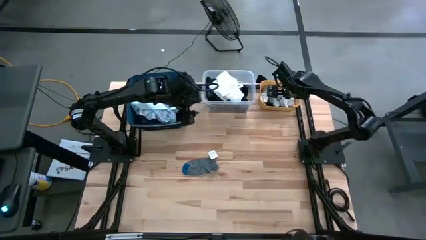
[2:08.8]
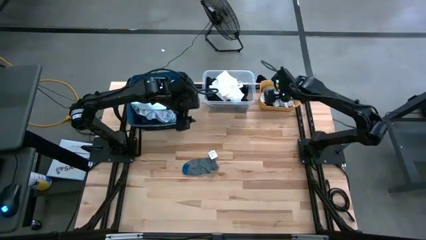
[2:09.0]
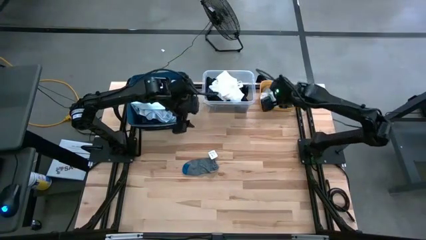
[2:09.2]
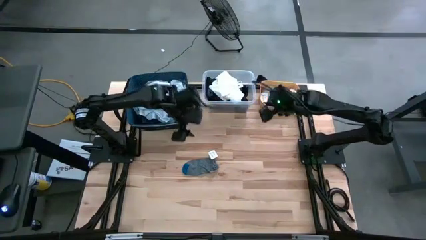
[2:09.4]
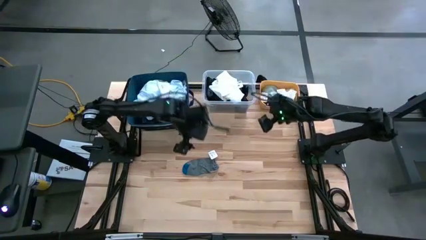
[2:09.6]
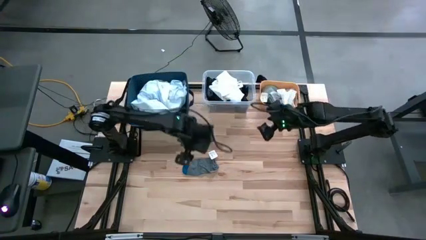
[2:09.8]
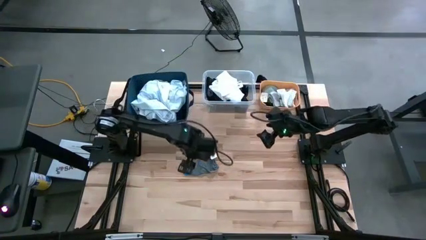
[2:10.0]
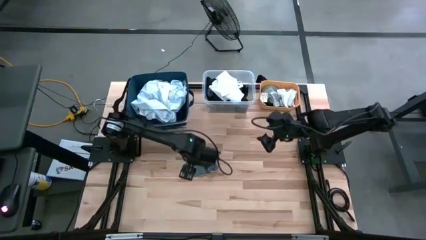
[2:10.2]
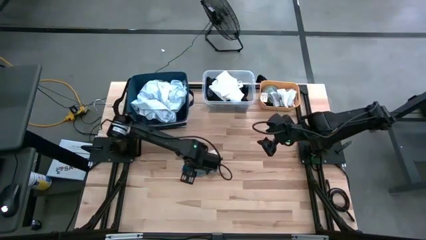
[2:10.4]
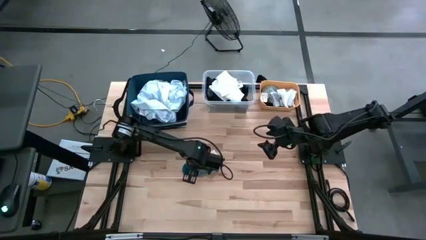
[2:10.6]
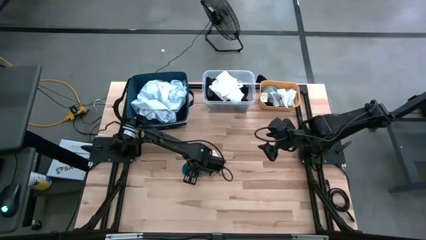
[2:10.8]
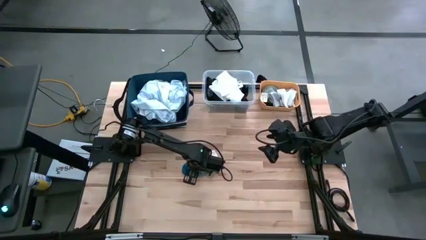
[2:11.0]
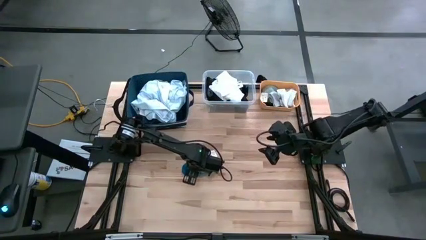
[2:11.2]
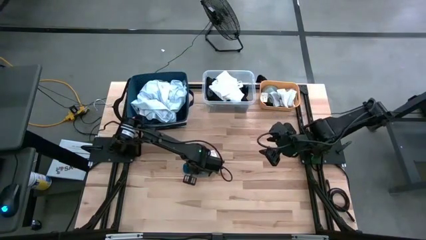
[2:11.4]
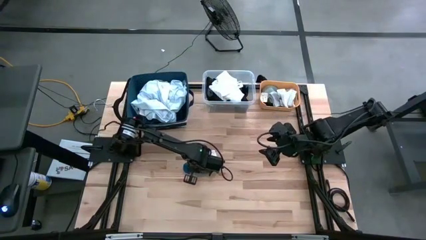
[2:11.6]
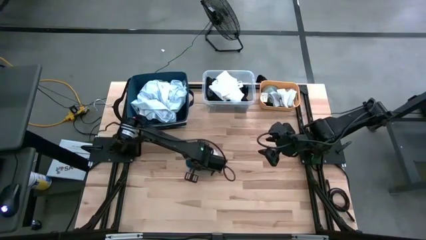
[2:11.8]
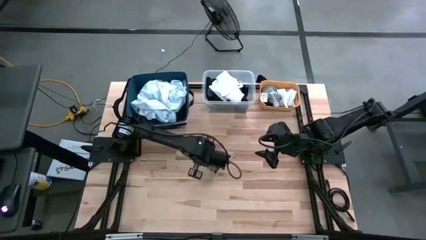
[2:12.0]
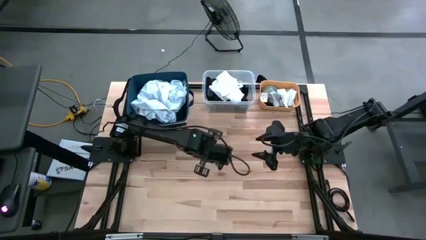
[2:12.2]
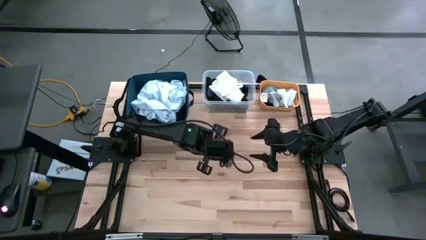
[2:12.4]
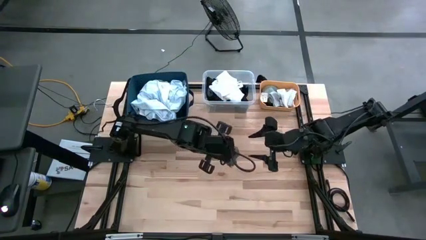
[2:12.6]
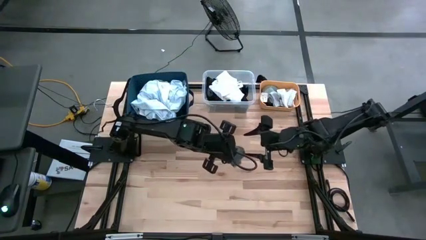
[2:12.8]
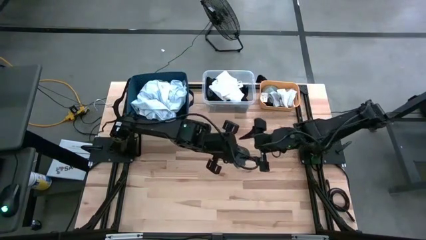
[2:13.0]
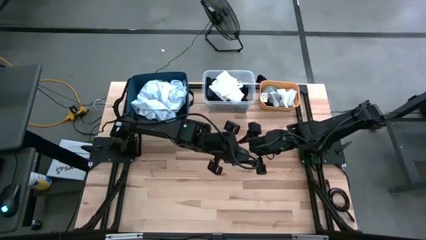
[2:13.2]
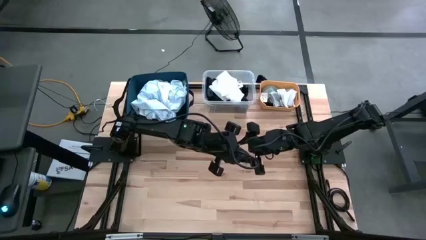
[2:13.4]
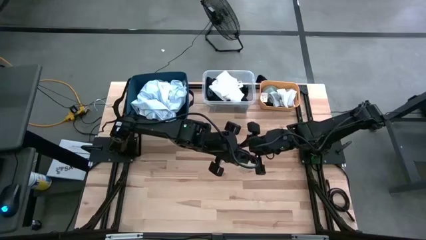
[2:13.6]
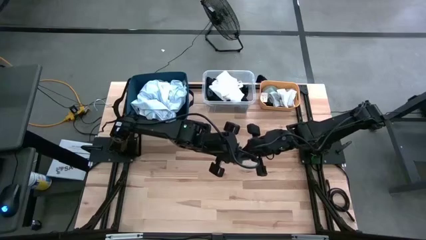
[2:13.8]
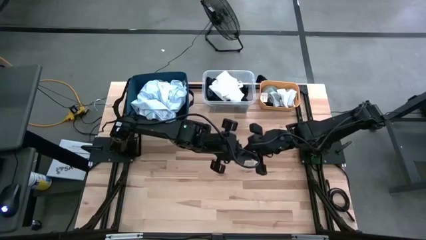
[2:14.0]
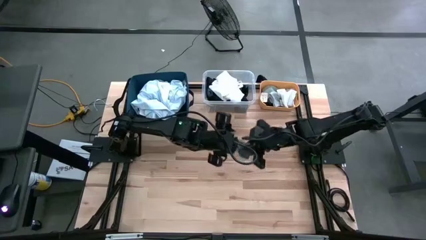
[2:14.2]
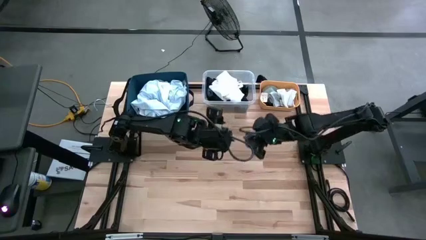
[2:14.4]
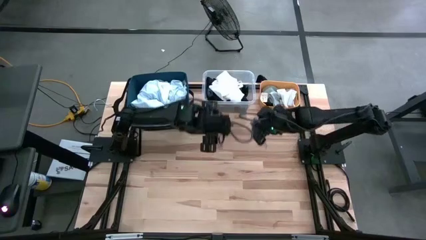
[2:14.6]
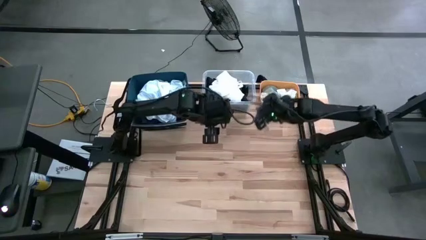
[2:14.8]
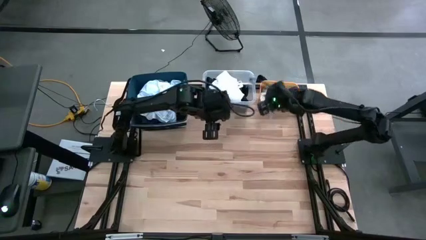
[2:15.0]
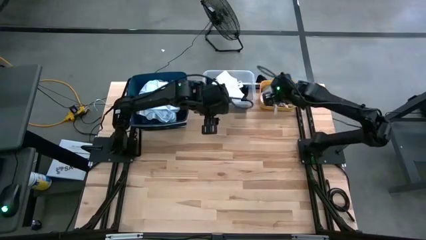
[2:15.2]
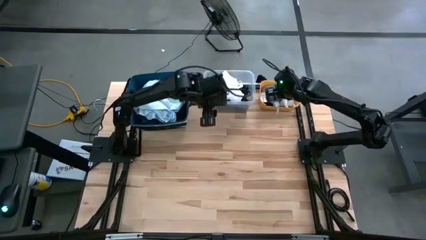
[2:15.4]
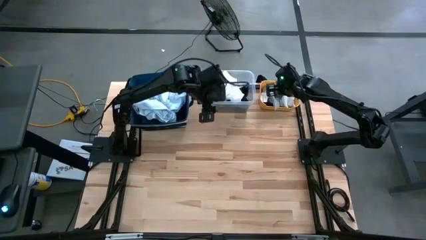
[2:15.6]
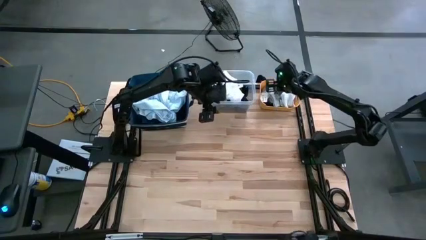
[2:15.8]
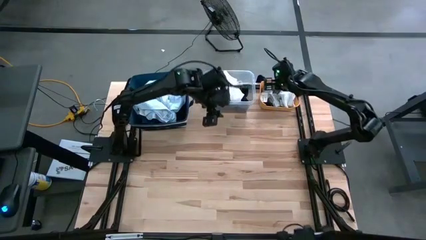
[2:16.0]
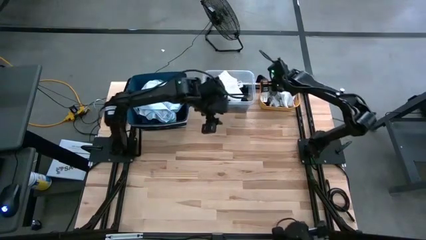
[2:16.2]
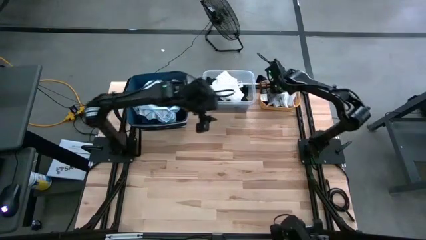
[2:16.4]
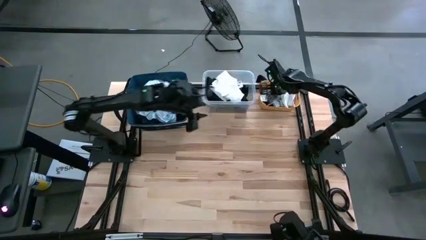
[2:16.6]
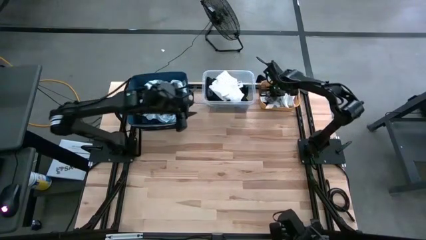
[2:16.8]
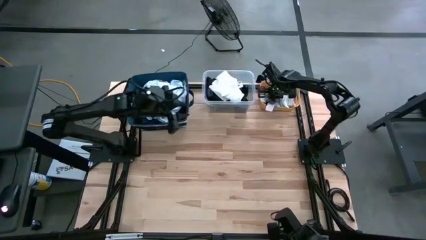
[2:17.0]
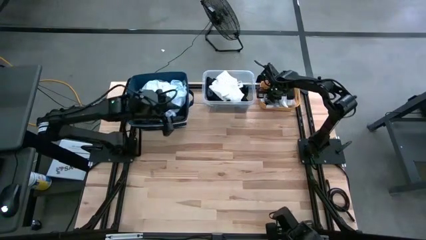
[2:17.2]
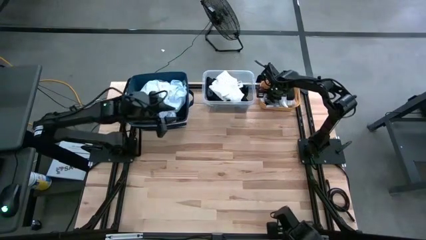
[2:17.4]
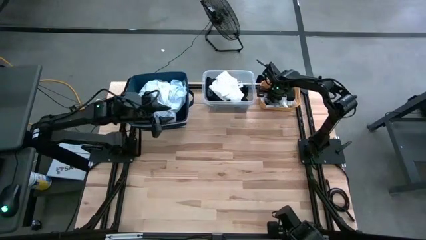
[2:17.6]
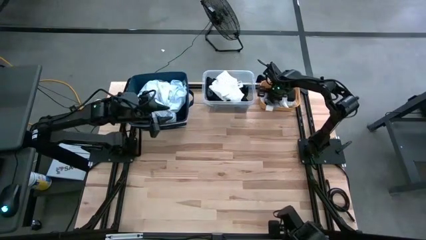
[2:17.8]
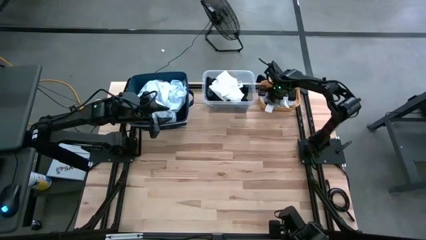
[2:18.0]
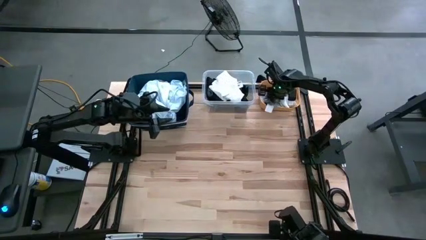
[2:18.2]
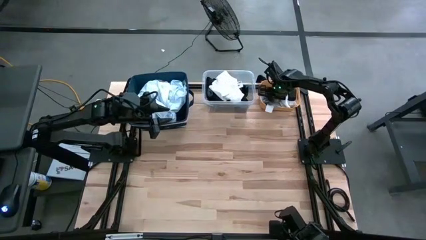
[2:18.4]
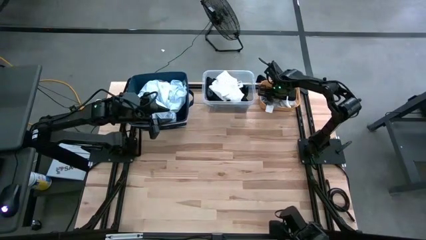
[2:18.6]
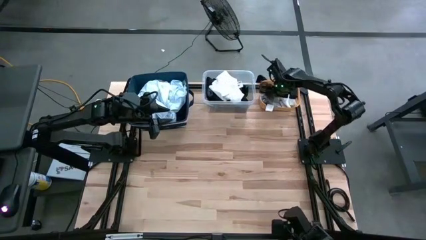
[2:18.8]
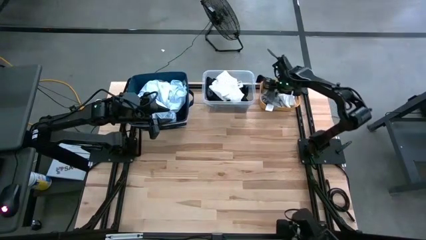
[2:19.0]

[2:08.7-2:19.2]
Task: Pick & Place Cloths
Put the dark gray sock into the yellow bin

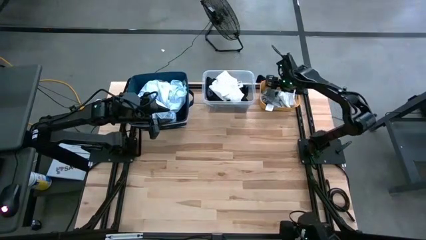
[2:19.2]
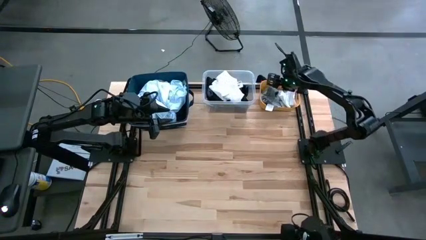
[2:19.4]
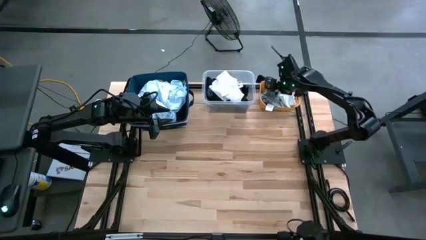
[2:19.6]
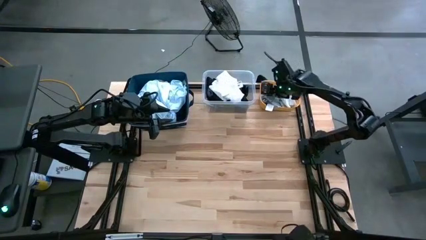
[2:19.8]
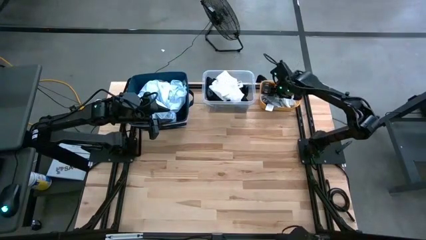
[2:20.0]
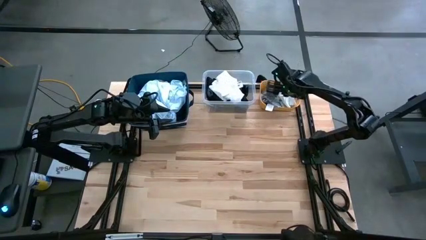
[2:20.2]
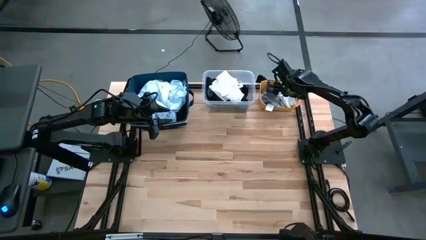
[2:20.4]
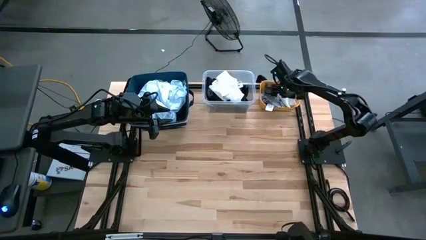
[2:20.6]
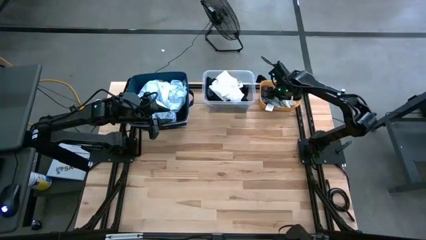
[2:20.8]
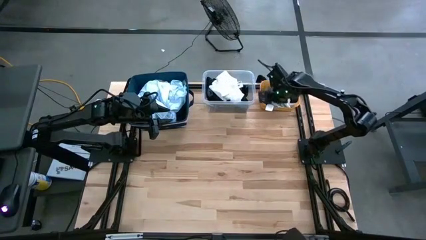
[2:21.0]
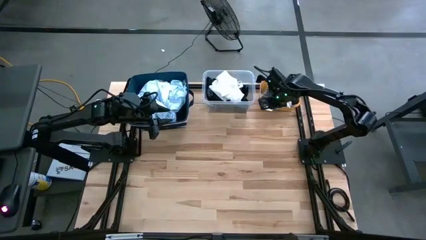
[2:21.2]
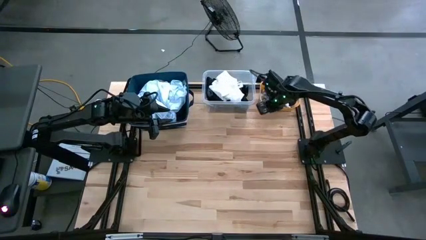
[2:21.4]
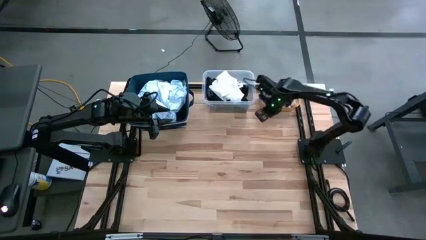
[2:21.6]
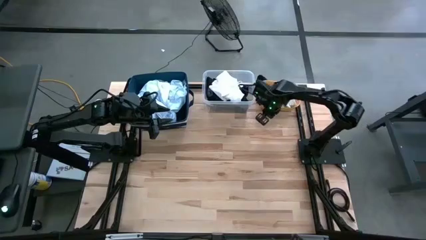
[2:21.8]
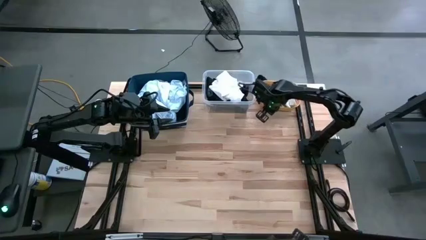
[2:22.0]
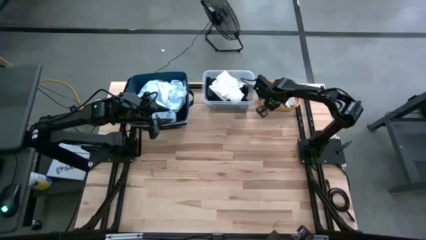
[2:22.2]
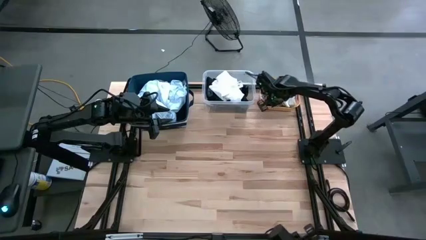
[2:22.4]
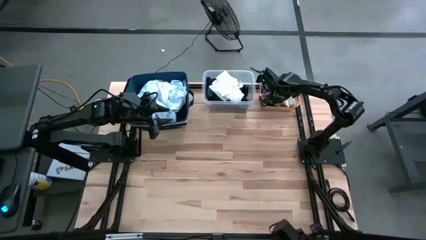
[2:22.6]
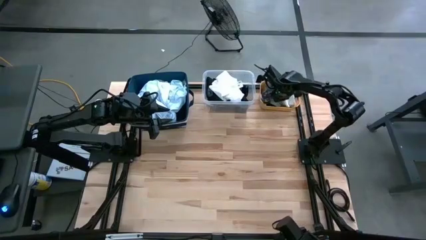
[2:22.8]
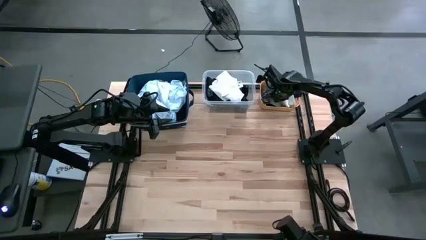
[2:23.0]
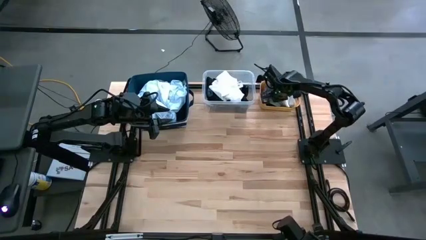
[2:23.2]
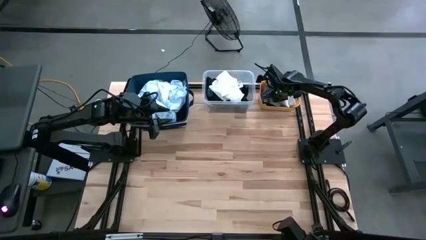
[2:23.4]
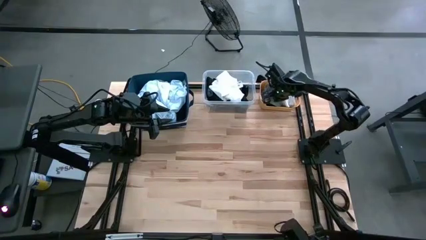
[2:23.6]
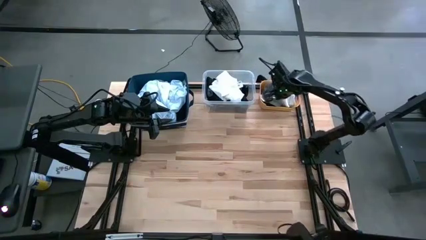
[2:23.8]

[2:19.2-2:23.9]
Adjust the gray sock in the yellow bin
